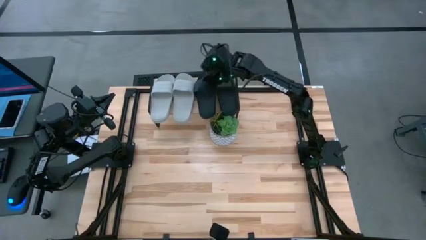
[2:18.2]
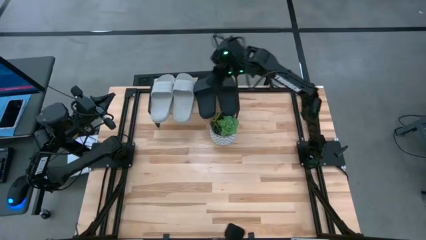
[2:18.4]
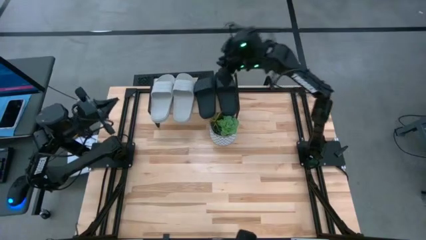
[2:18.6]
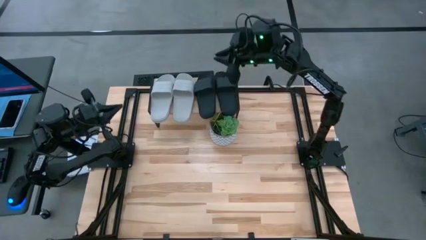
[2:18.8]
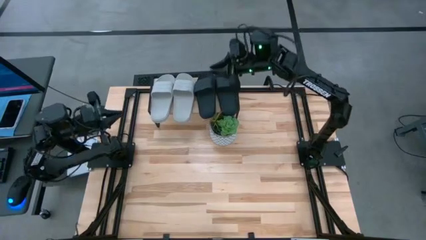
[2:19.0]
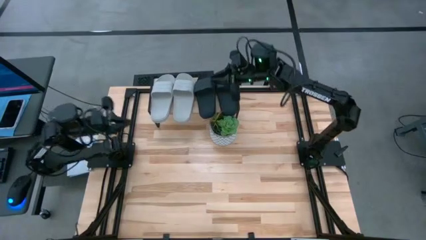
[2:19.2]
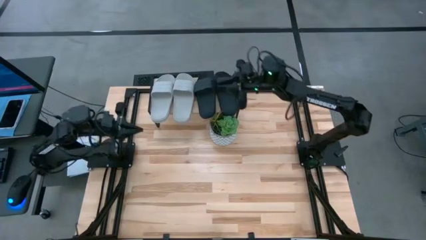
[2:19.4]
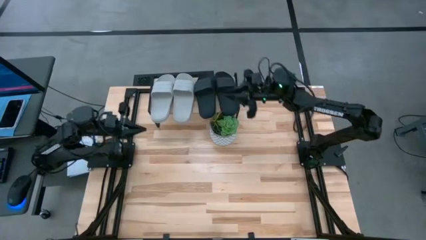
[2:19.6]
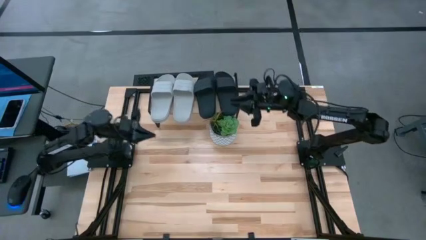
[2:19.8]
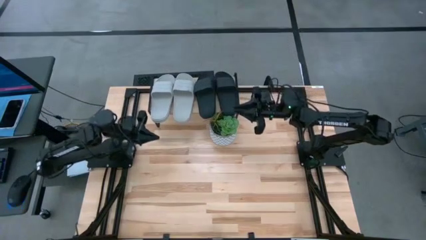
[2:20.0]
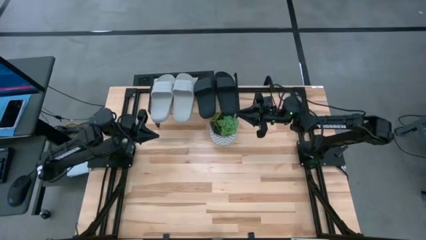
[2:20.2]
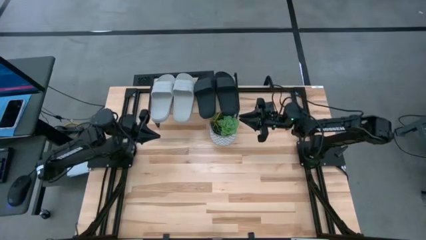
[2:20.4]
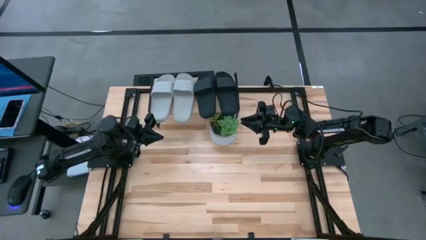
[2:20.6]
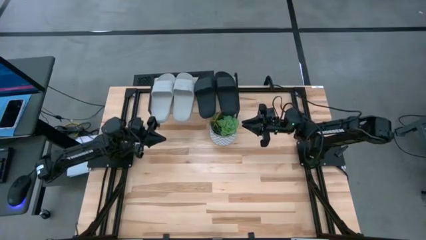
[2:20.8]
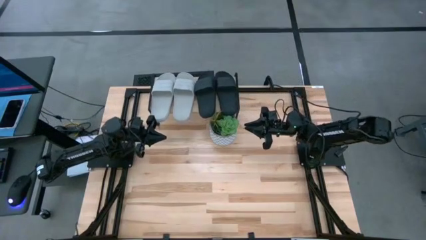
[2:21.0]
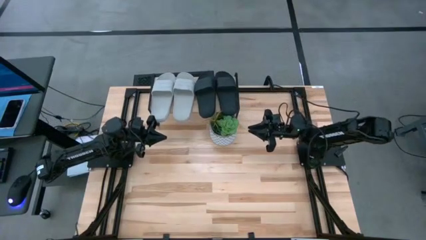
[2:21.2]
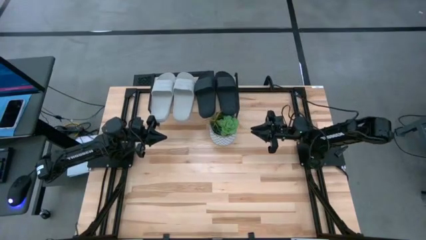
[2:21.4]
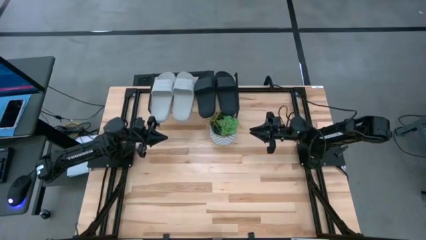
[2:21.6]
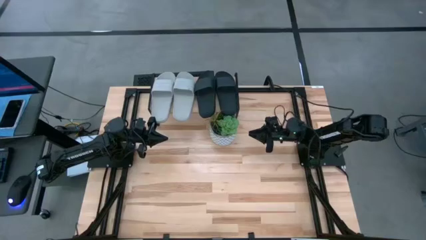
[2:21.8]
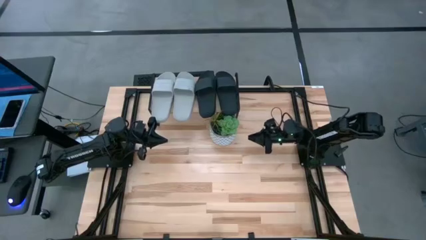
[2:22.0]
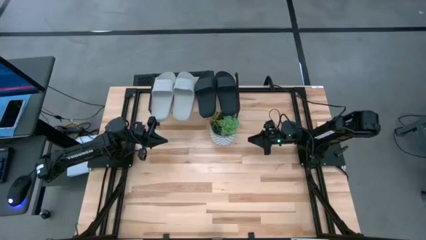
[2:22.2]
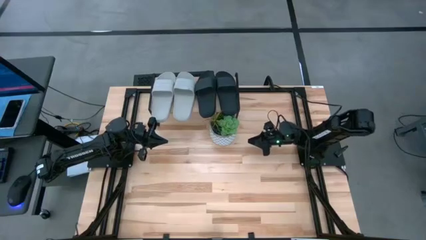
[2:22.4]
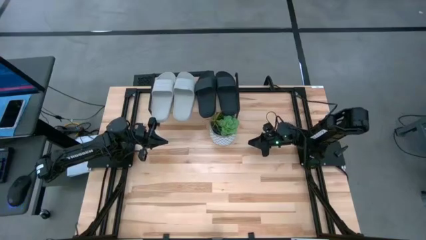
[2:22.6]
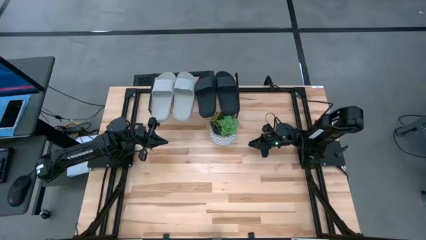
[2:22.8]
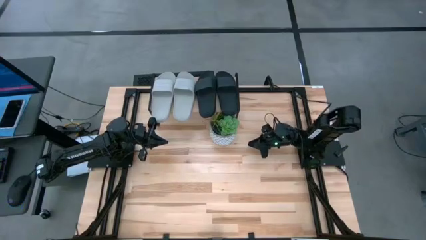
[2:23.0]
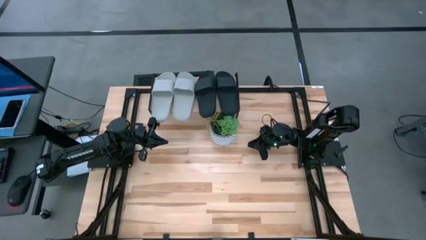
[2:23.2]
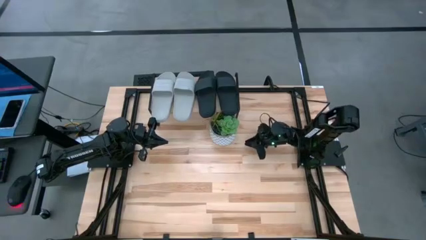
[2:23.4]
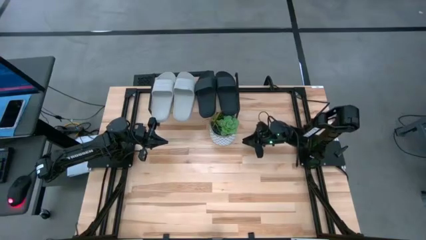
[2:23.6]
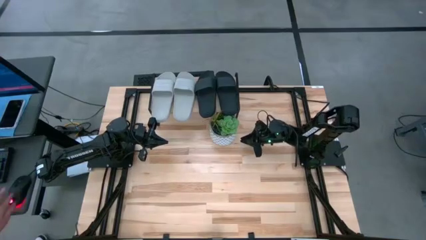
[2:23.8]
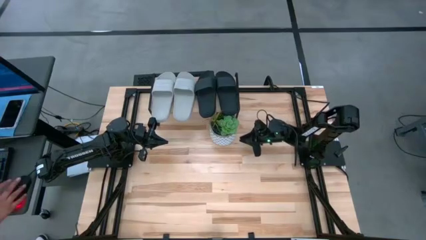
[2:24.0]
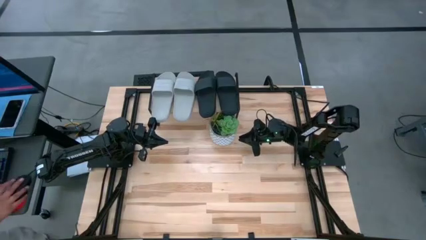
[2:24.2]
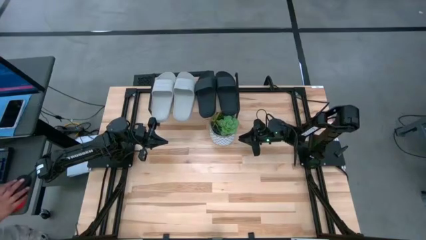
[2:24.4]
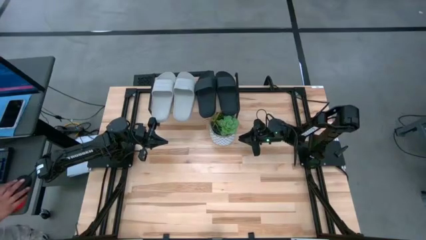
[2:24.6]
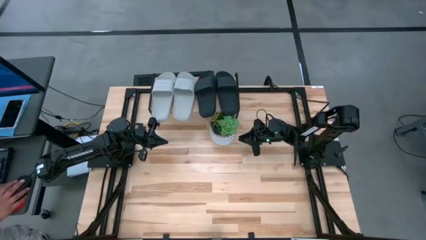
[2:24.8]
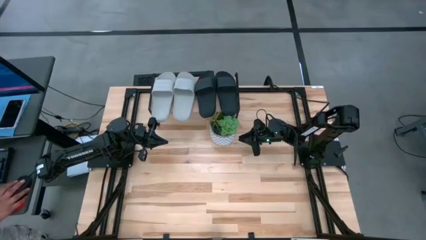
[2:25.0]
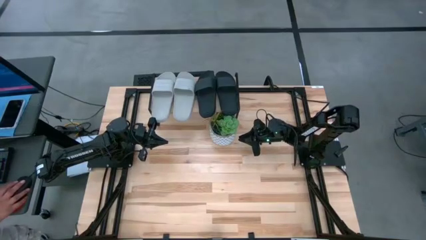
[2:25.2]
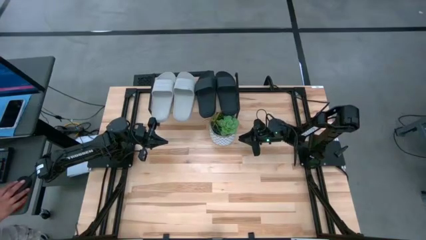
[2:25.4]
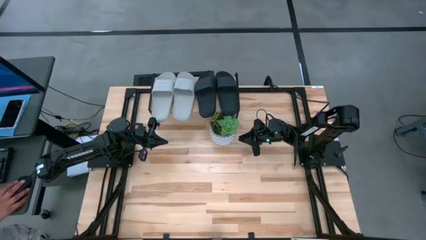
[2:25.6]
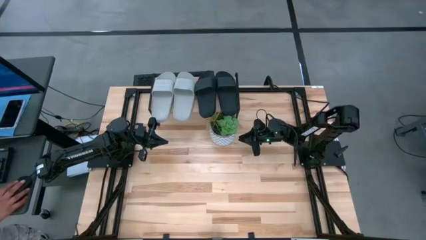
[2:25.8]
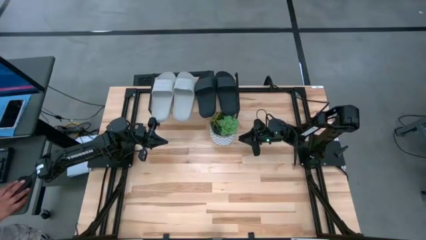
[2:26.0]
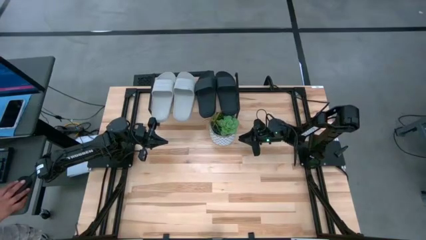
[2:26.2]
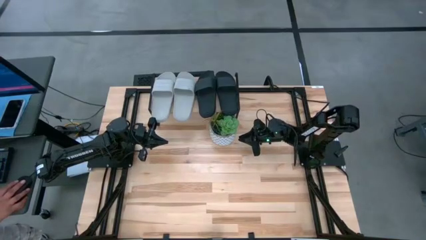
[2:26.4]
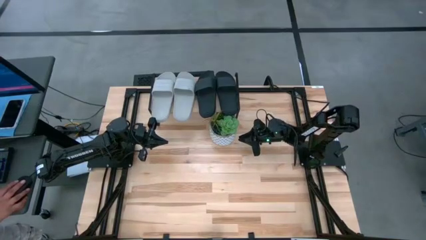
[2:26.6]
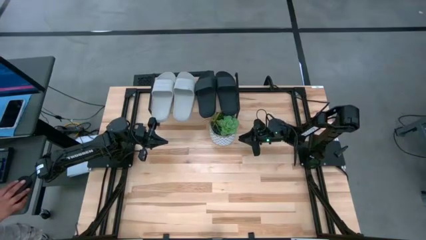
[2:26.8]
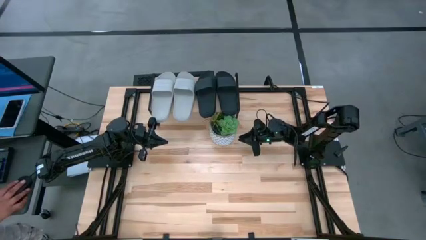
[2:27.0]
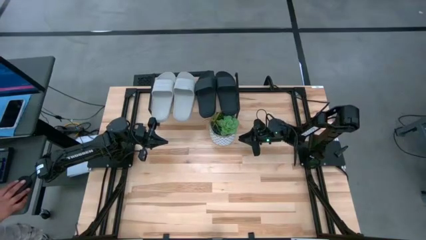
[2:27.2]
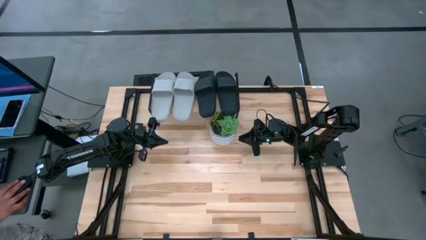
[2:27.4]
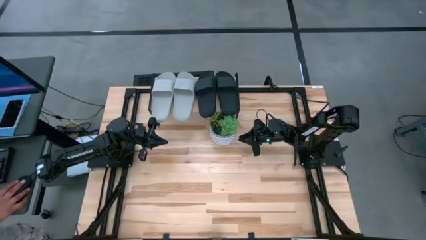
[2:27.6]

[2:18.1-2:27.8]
Task: Pick and place slides into the shelf
Return to Home Position

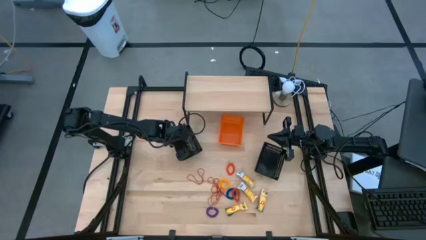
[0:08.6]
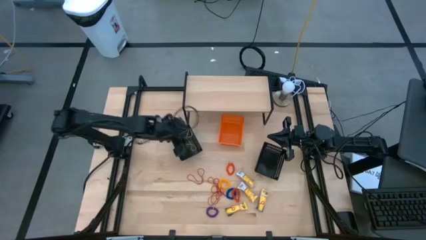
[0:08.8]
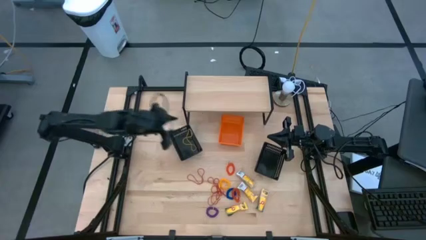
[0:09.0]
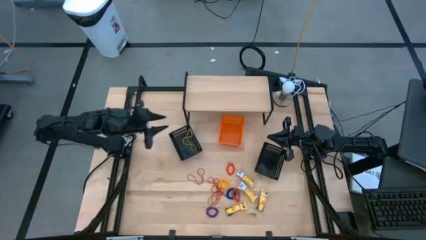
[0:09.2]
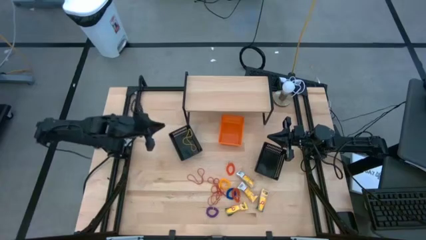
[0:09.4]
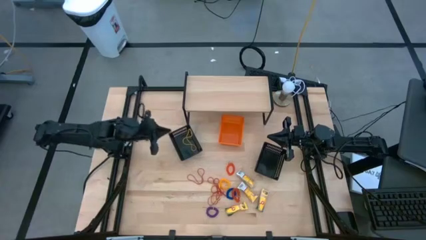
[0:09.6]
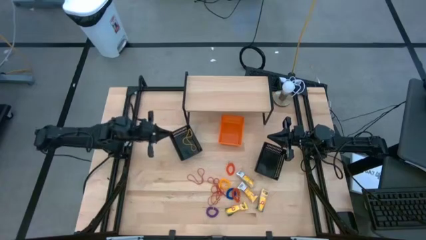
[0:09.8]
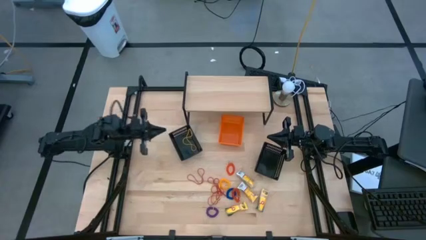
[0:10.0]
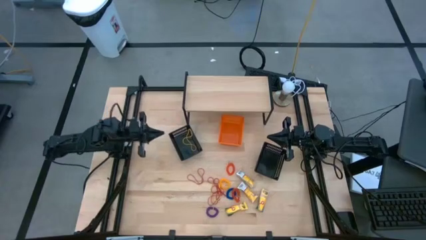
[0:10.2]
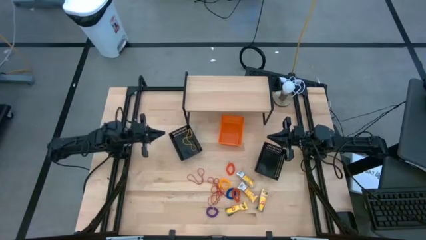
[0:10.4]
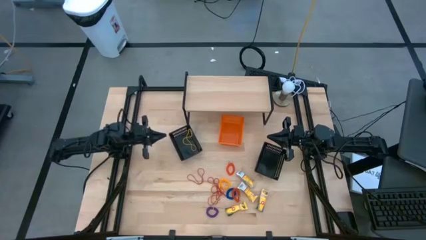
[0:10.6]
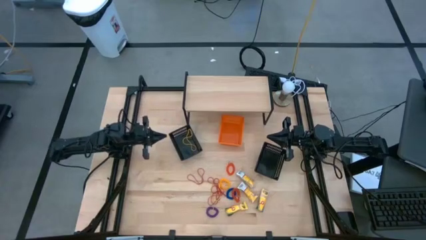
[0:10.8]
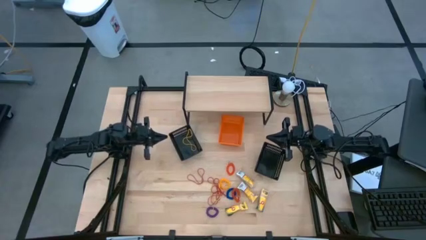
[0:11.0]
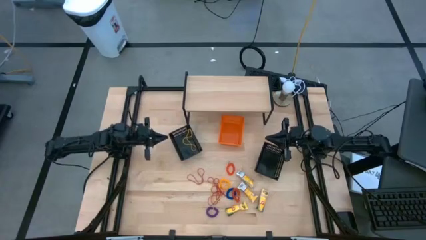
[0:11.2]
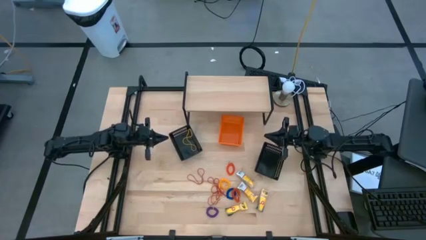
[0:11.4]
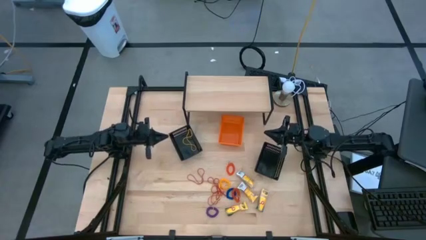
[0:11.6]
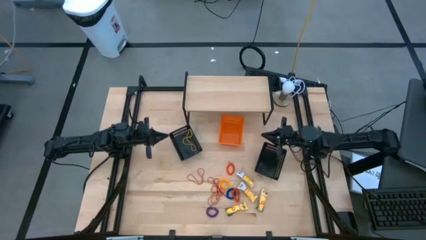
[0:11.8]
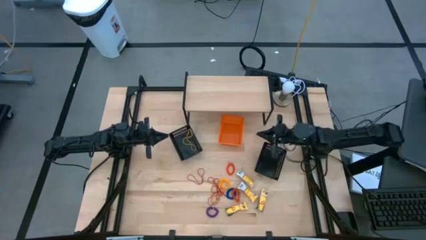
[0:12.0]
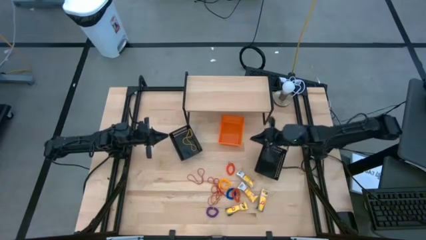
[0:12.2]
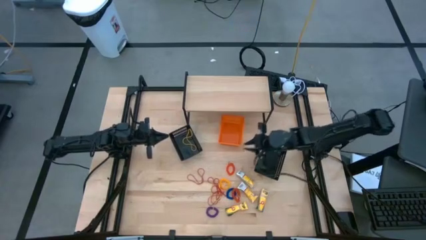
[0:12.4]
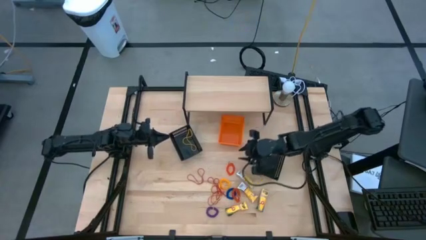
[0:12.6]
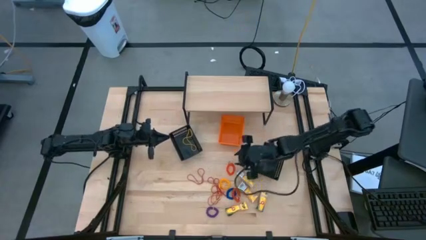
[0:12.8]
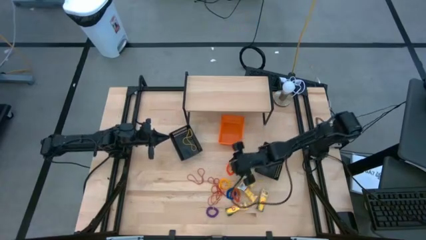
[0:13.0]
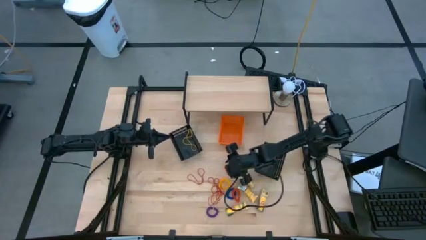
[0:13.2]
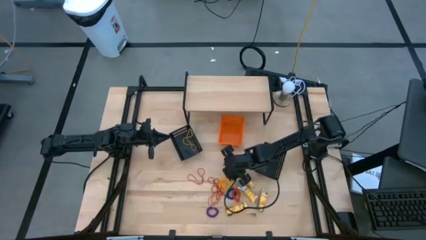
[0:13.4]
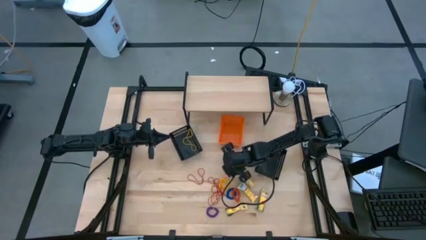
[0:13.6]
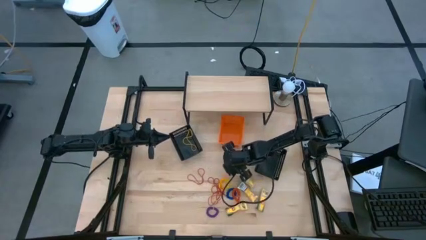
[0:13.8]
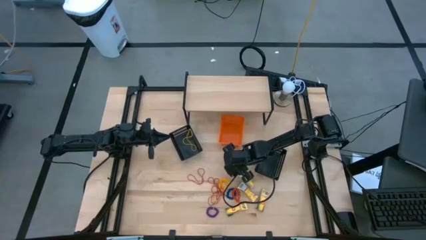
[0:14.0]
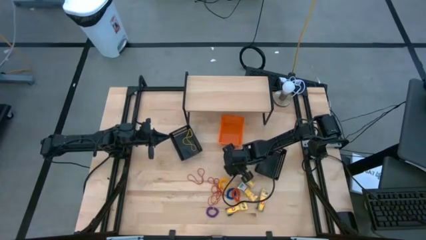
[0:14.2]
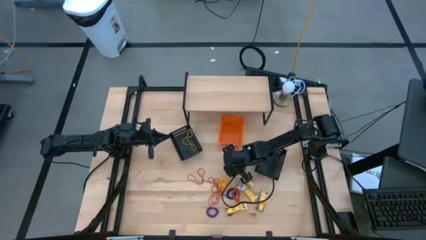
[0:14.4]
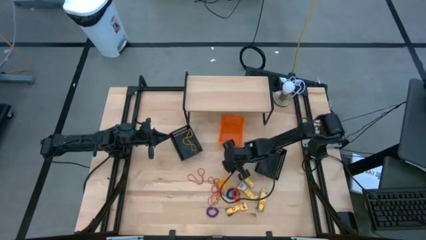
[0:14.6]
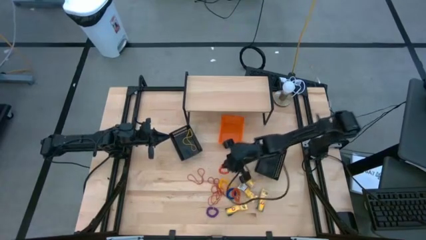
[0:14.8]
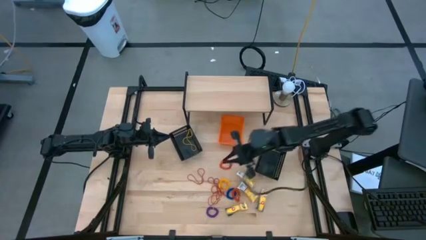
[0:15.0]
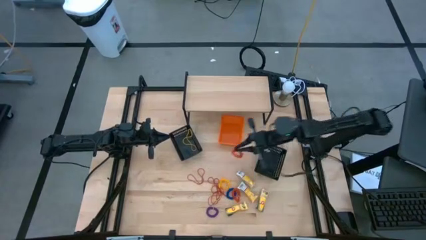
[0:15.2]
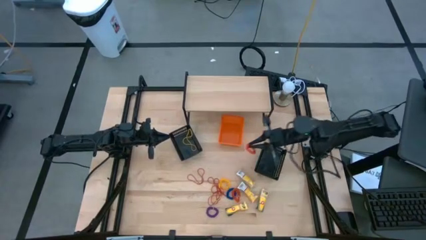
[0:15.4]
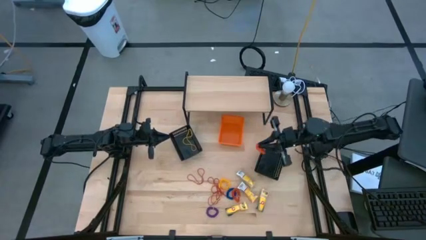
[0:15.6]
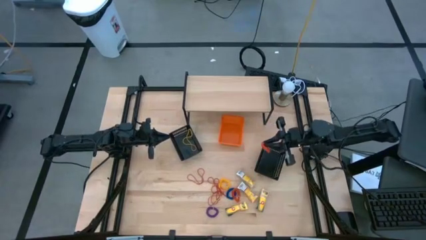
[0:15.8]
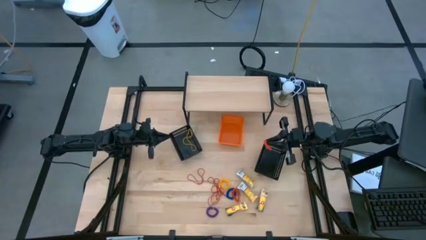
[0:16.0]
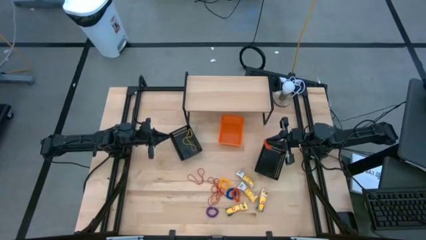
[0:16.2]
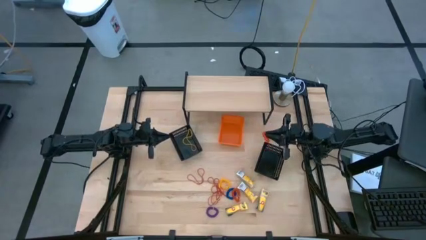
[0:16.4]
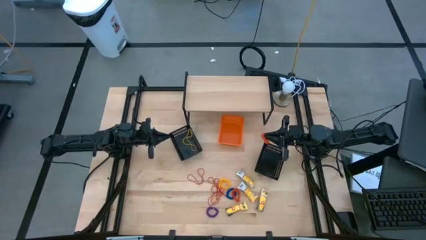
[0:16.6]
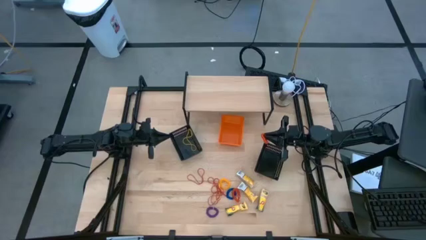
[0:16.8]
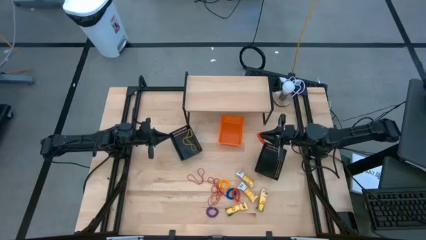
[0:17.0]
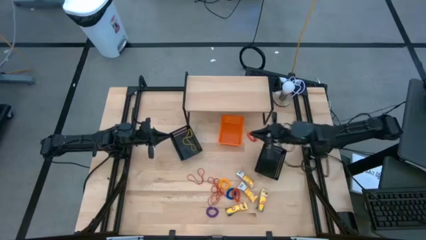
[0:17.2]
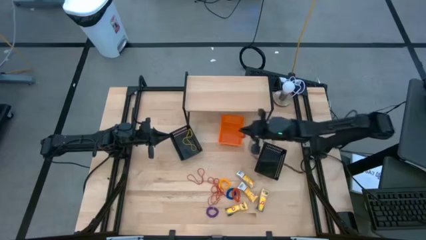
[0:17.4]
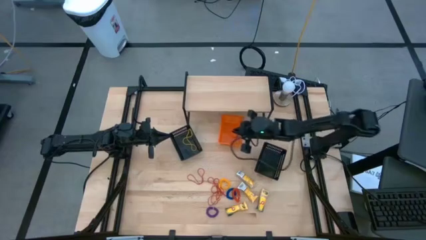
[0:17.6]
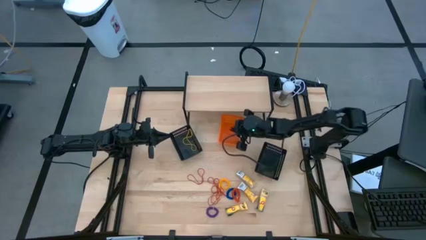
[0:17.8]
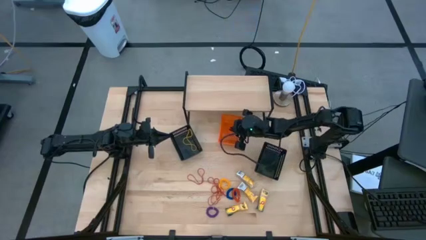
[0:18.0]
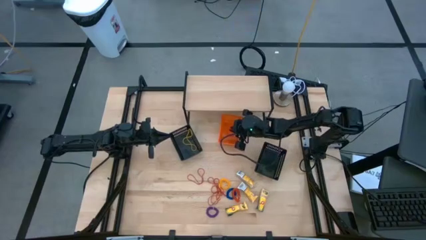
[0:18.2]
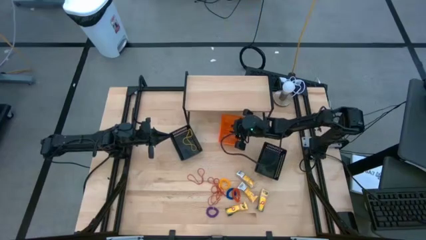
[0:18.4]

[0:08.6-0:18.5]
Task: Pick & Place Office Desk Supplies
Put the orange spring keychain into the orange bin
